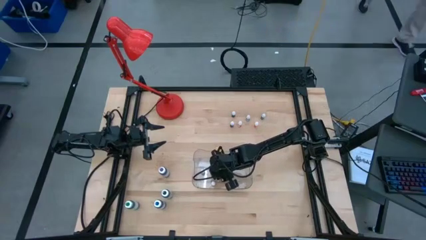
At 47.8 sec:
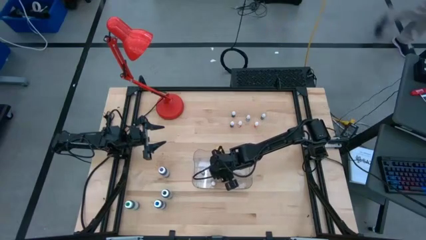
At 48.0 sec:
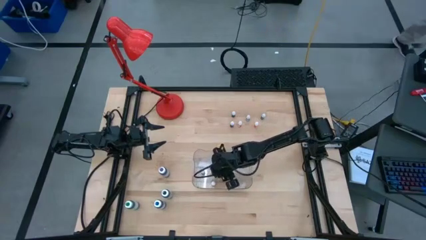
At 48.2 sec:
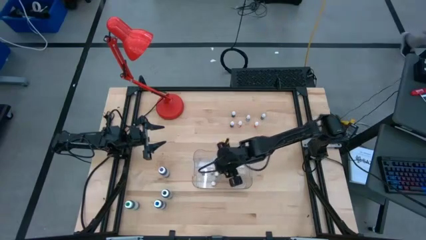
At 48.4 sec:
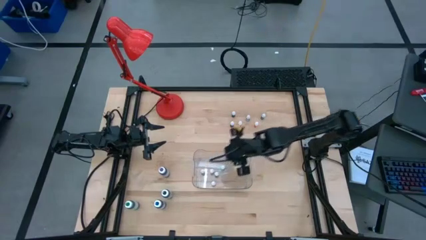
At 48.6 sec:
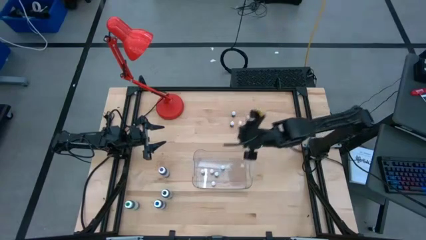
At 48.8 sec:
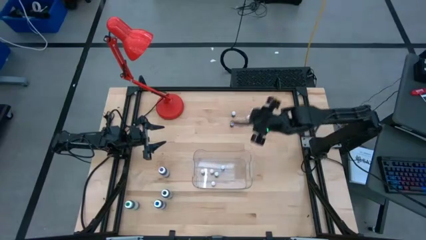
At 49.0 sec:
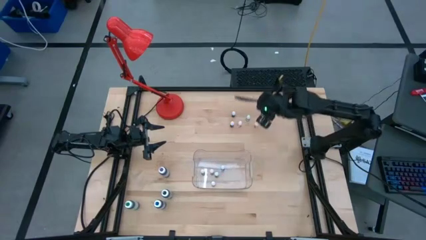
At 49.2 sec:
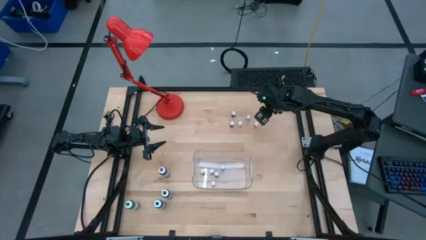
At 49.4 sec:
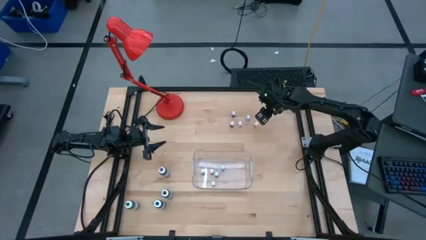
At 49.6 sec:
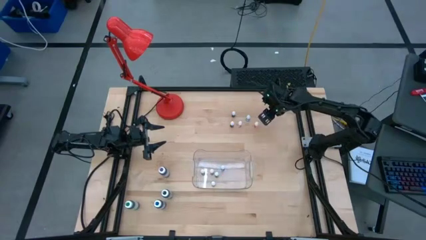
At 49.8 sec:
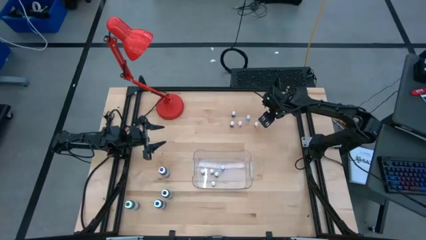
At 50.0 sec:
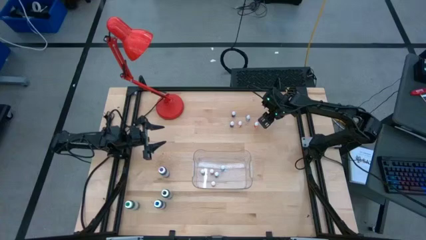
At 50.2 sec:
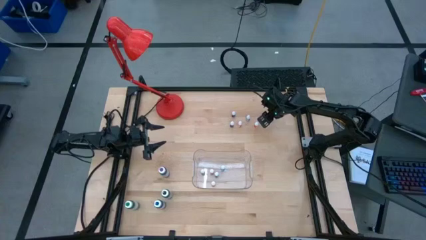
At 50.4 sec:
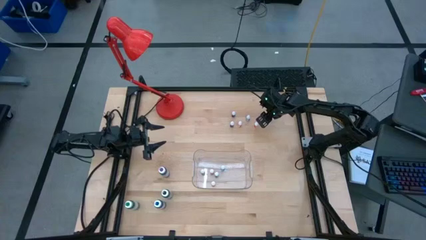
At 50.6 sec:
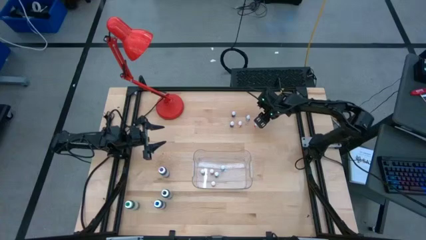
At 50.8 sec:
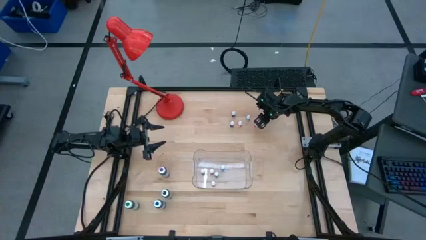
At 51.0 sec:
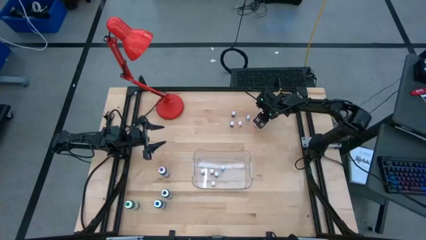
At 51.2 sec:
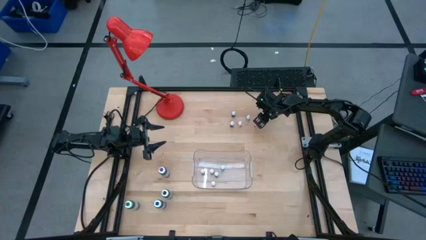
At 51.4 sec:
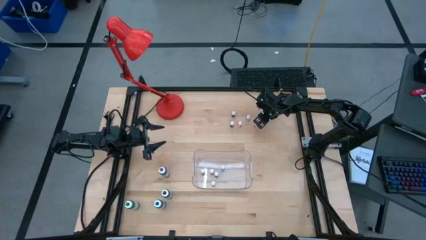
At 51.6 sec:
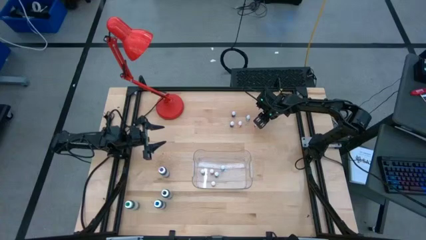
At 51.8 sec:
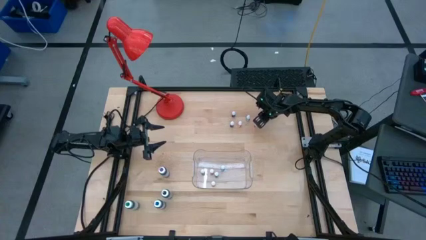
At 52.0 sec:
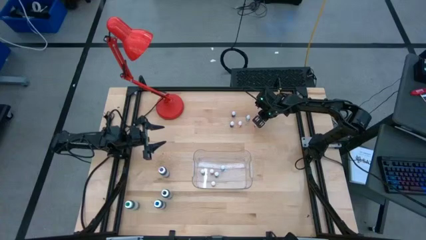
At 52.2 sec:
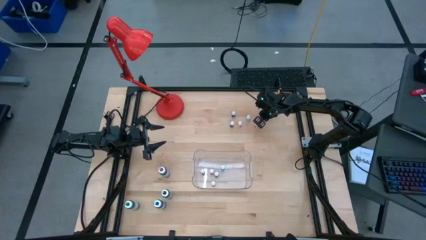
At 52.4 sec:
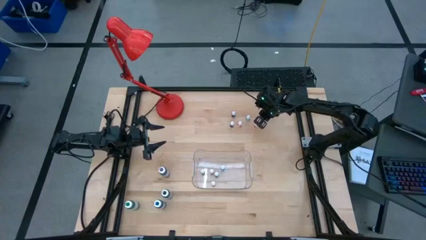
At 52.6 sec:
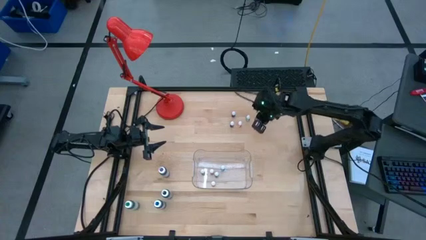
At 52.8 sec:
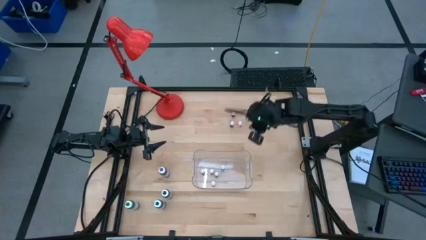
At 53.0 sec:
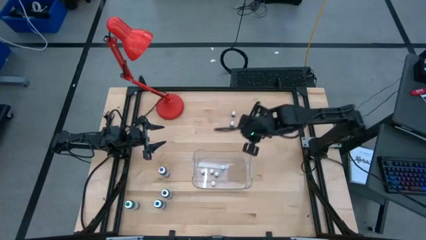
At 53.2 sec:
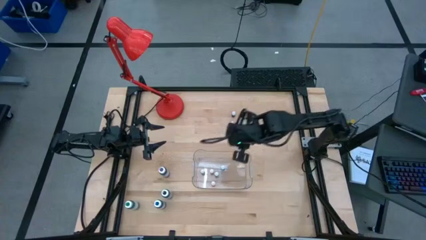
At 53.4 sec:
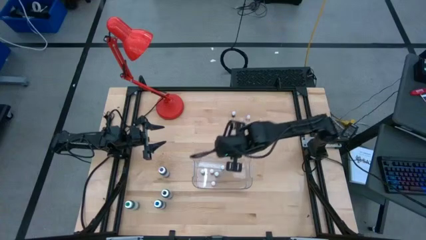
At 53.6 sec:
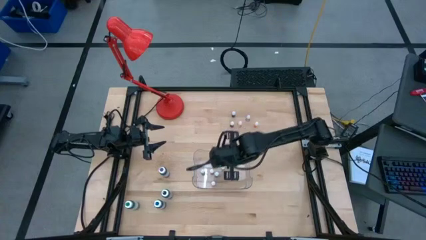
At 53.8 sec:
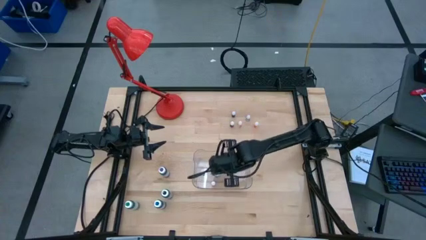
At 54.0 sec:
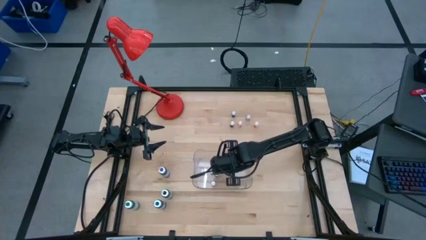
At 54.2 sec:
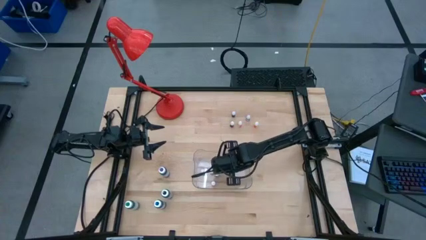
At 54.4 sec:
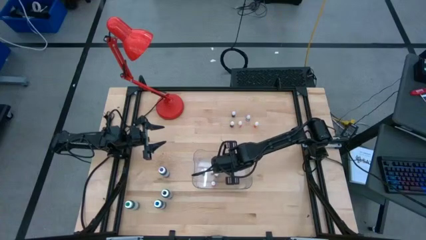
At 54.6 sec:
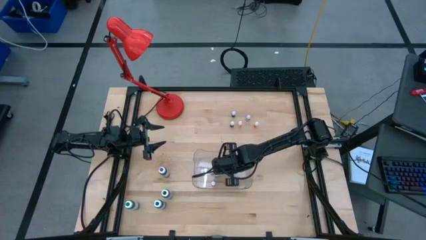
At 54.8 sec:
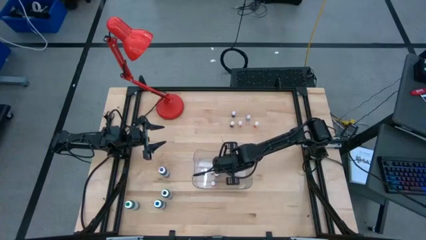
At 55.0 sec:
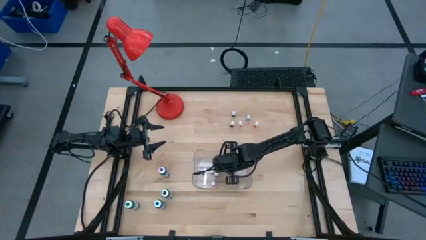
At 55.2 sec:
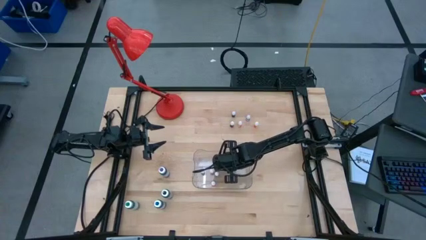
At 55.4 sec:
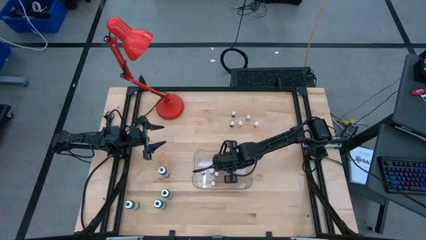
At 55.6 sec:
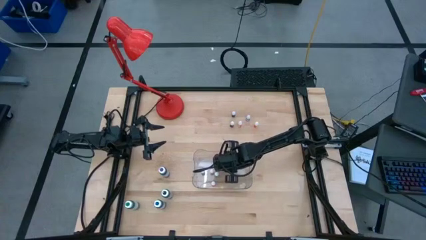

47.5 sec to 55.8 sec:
Task: Pick & Place food coloring
Put the small green food coloring bottle into the transparent bin

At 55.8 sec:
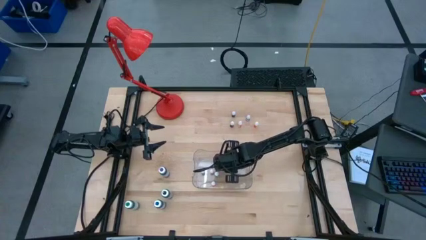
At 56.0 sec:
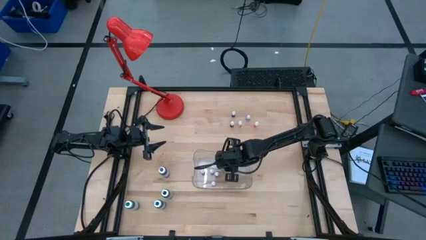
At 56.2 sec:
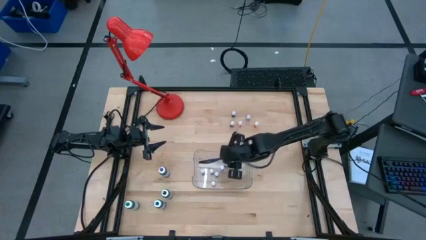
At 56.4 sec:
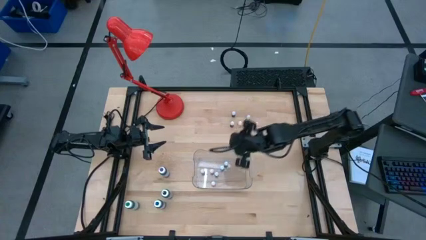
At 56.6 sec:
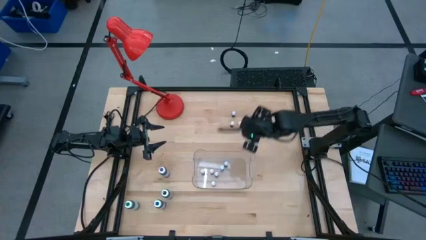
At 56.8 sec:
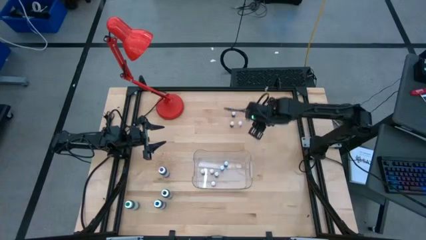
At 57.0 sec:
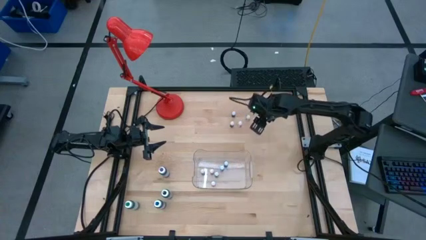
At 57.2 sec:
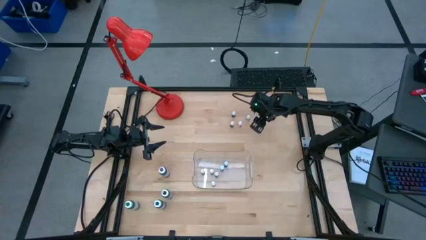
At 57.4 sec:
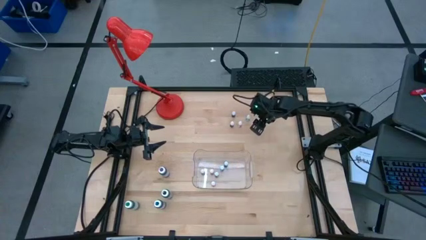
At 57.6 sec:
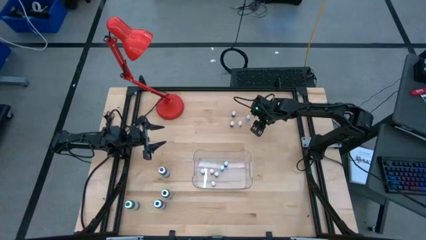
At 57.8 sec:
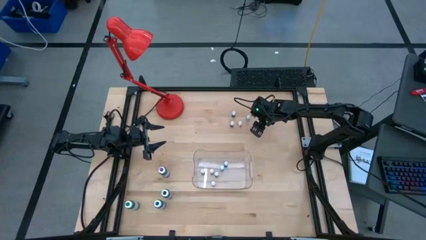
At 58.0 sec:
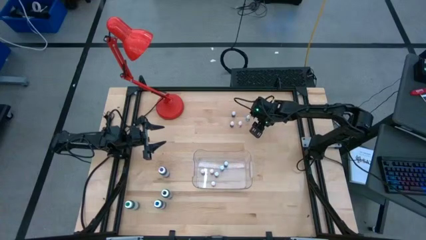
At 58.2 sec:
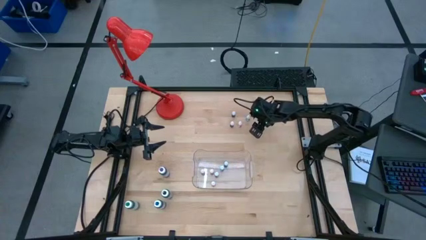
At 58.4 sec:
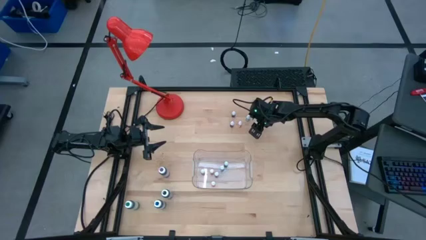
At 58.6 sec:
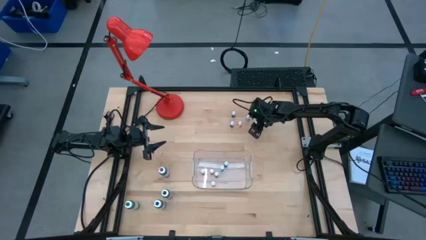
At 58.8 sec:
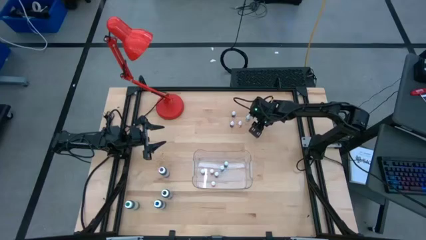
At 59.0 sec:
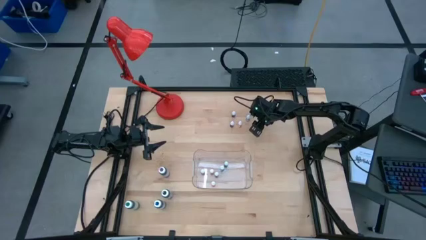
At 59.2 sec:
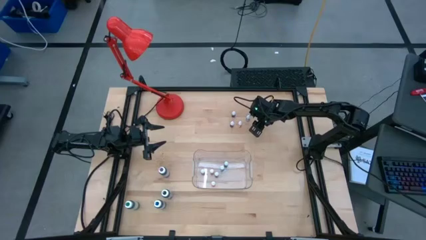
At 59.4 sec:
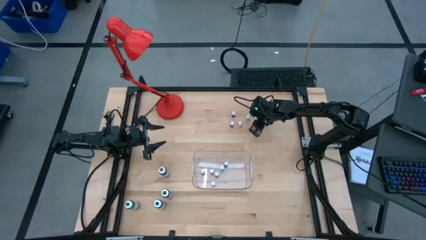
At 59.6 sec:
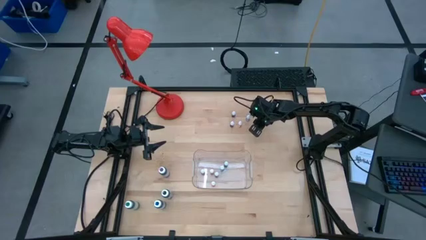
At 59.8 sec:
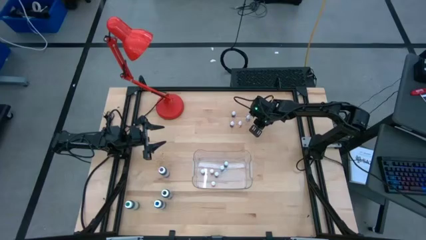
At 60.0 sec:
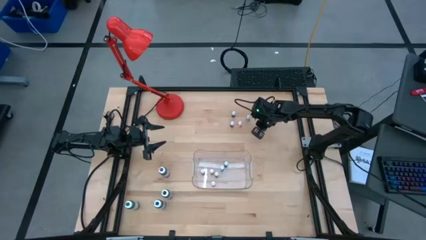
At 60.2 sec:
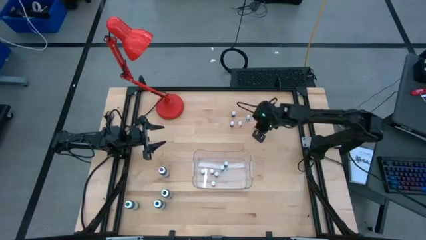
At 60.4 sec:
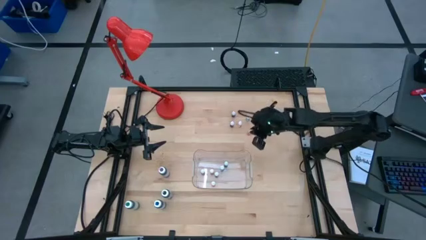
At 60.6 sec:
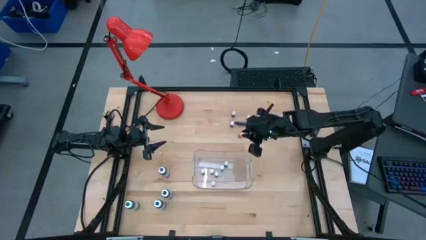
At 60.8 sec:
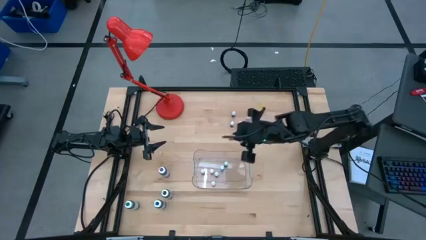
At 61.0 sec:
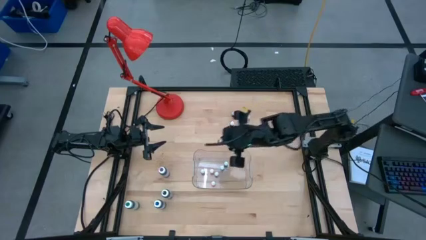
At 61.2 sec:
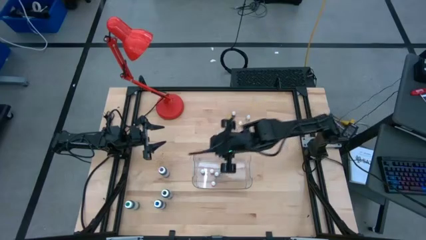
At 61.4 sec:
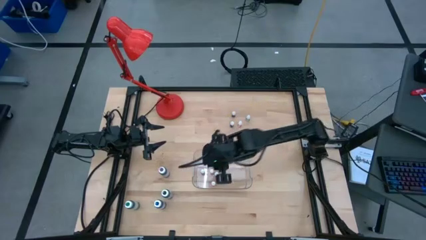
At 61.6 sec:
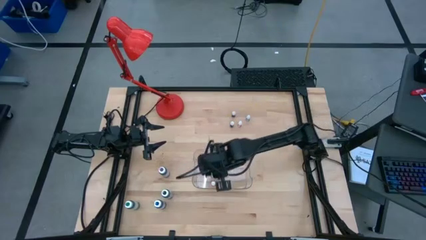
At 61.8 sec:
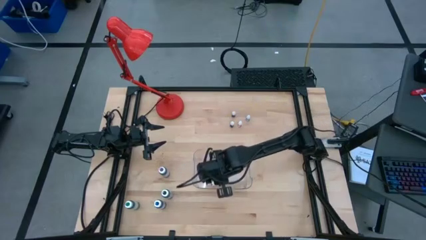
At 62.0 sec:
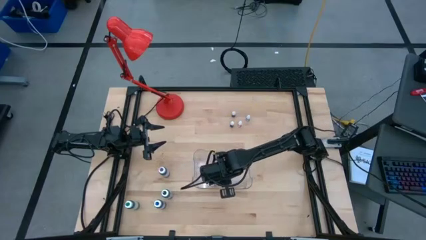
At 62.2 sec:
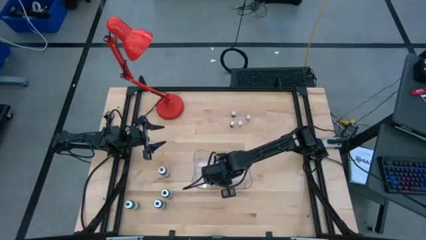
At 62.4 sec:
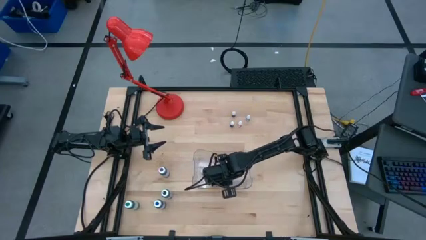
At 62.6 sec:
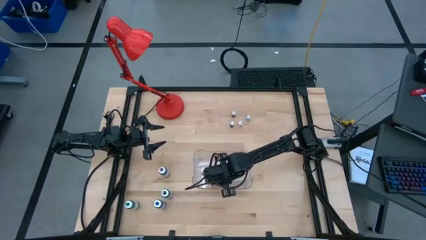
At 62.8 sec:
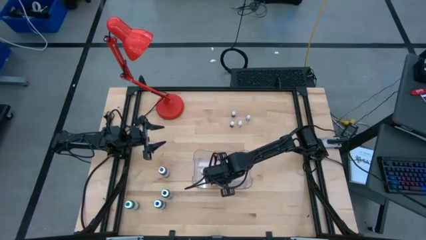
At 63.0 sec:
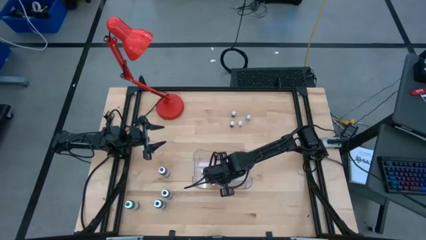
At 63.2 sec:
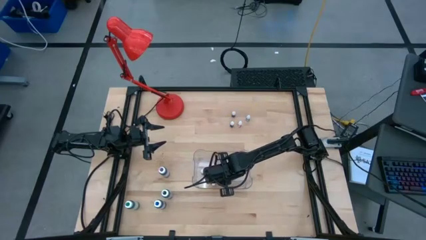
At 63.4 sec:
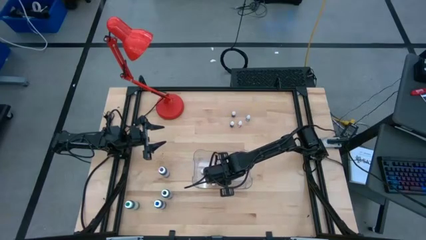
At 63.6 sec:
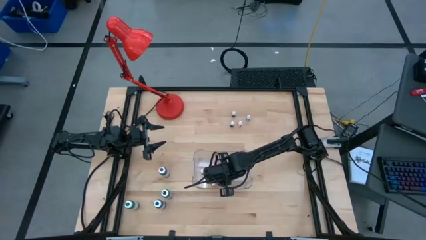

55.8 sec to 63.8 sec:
Put the orange food coloring bottle into the transparent bin
